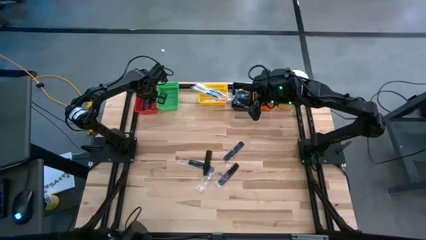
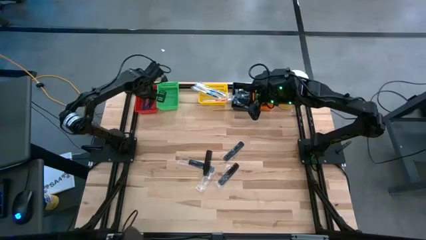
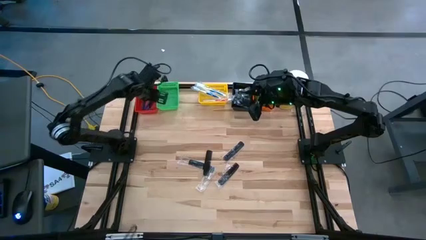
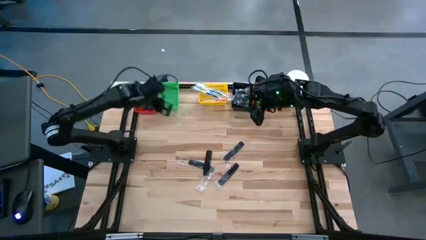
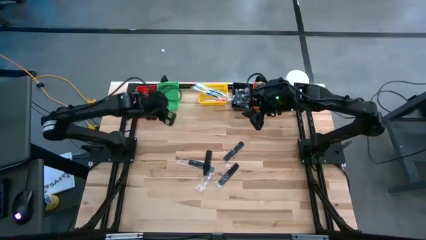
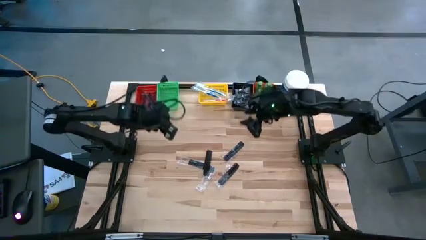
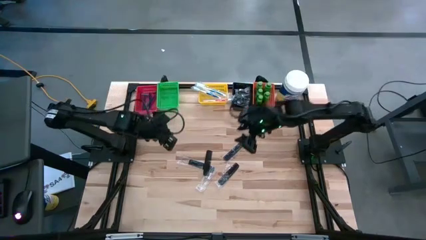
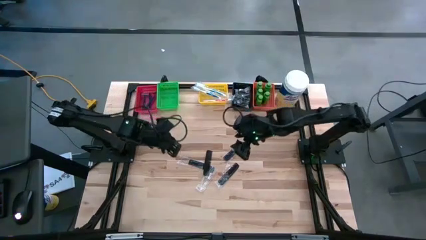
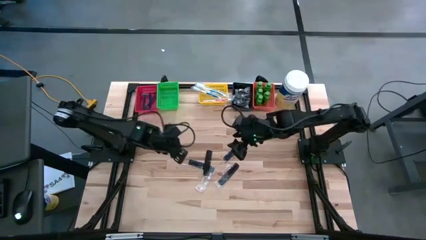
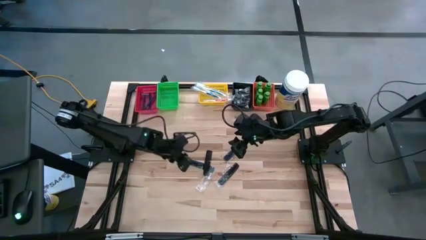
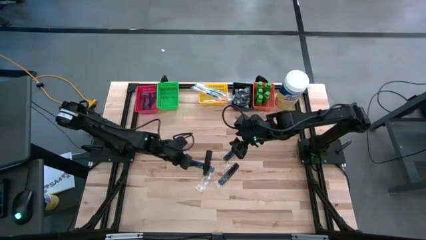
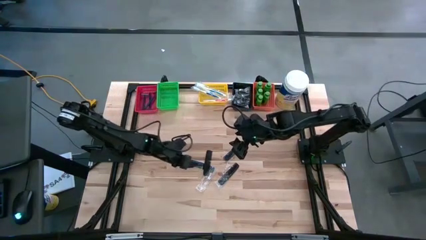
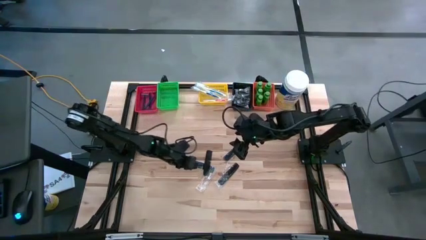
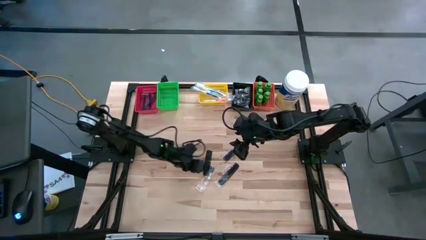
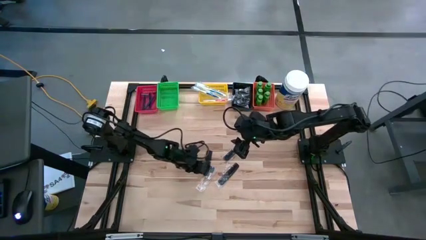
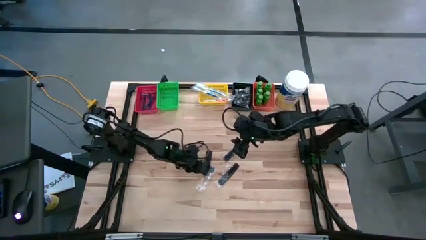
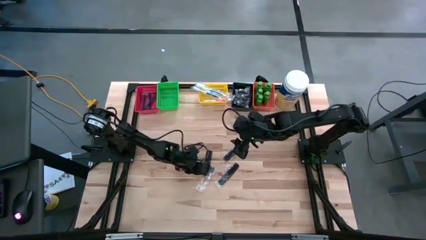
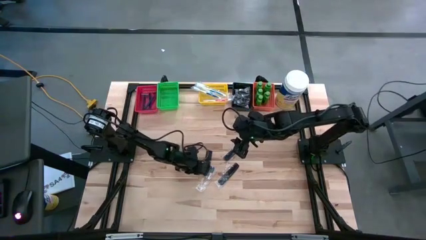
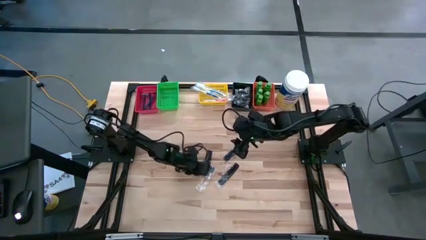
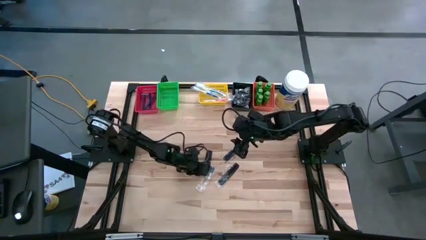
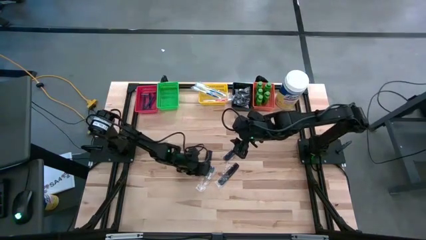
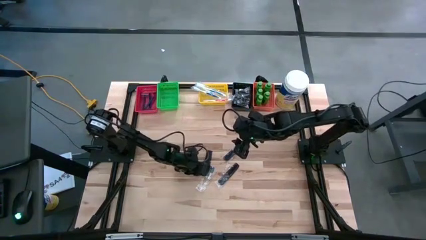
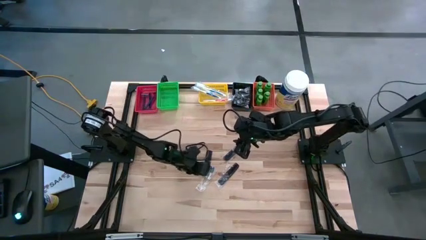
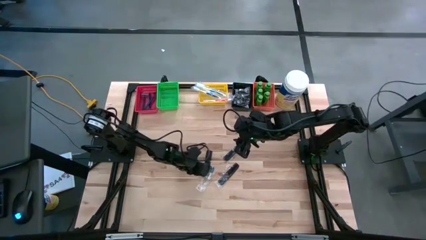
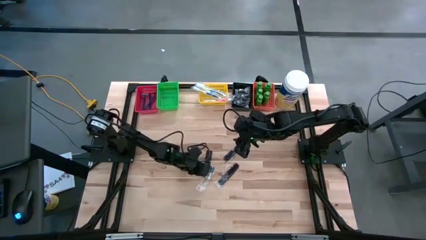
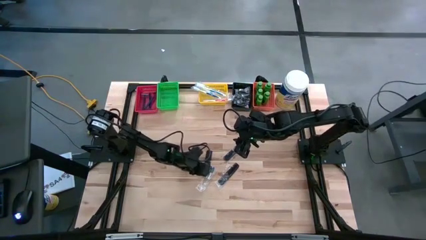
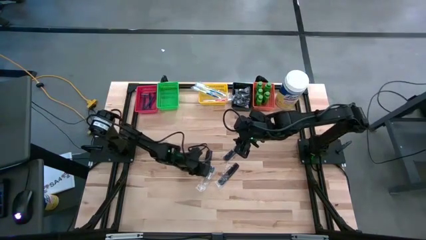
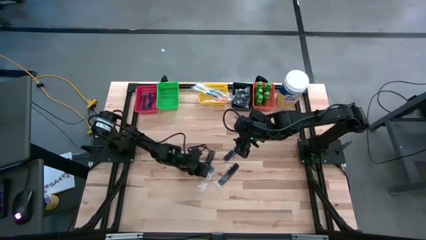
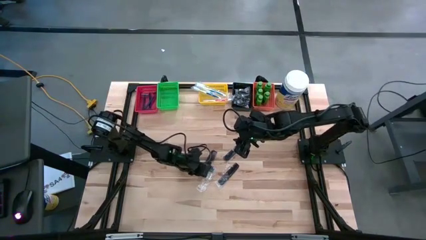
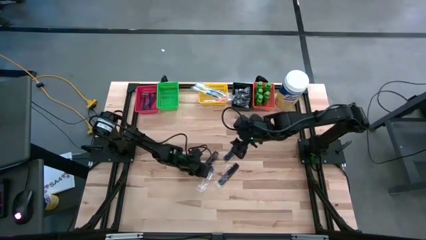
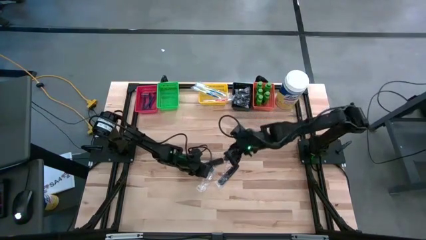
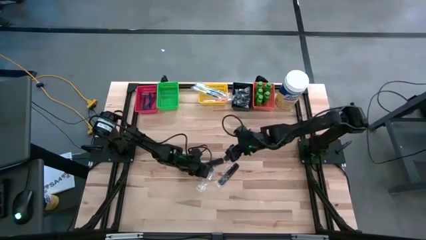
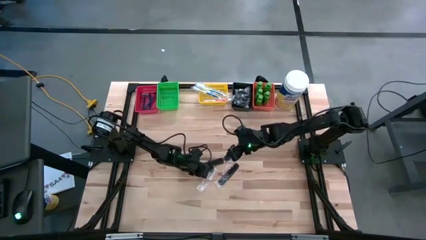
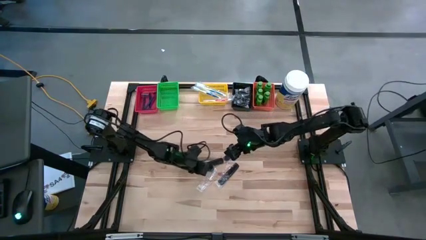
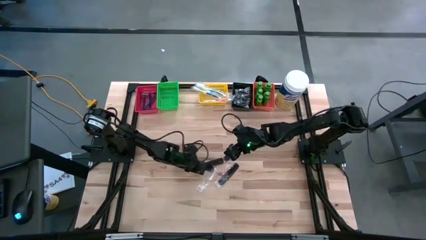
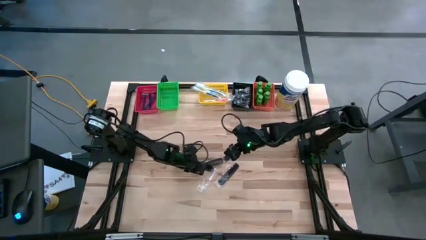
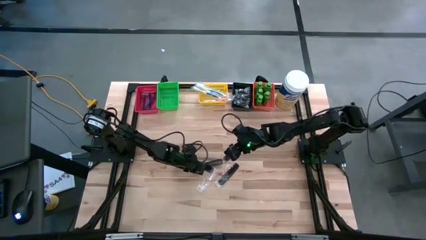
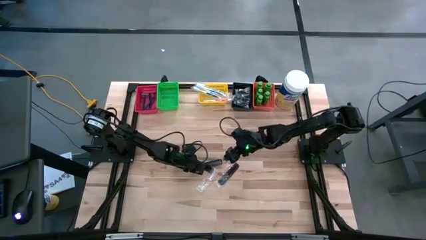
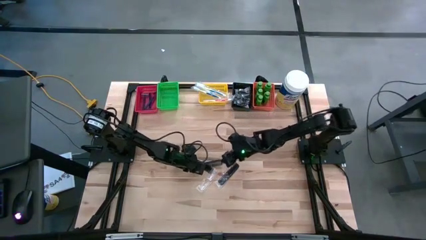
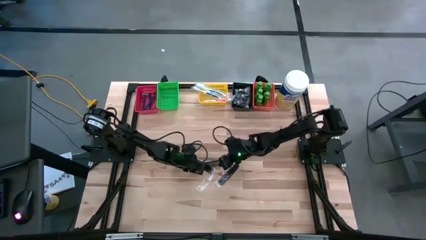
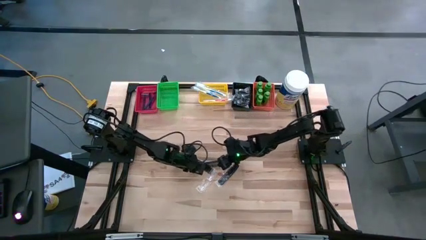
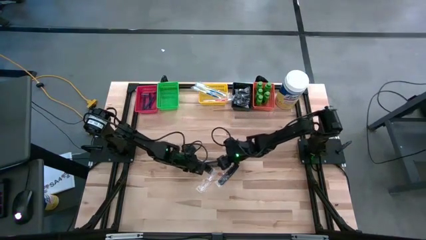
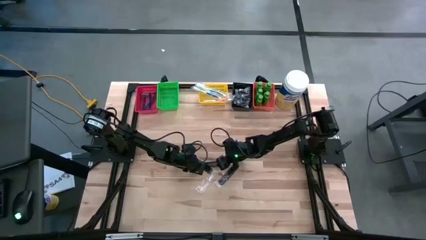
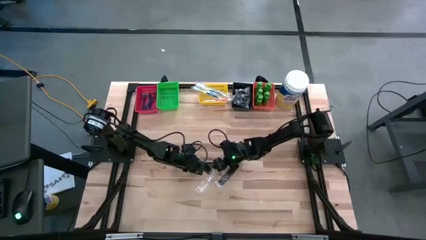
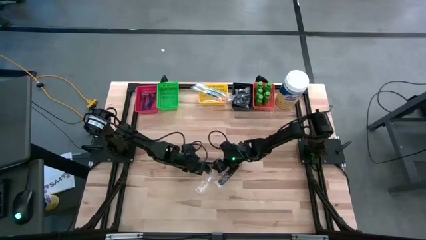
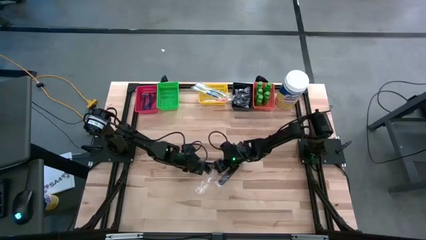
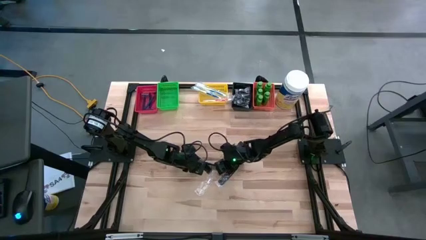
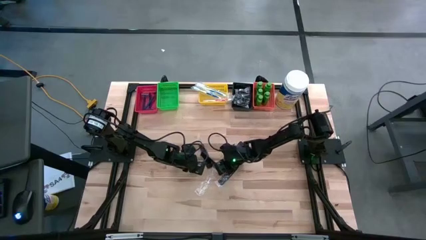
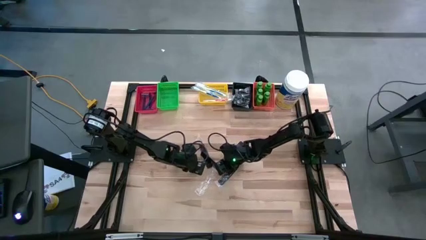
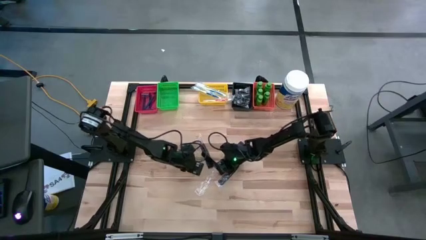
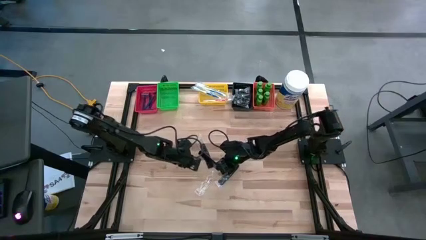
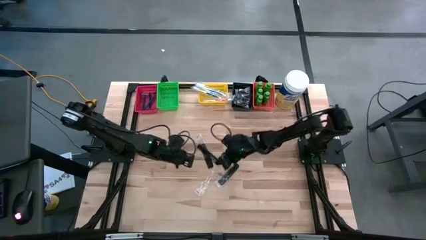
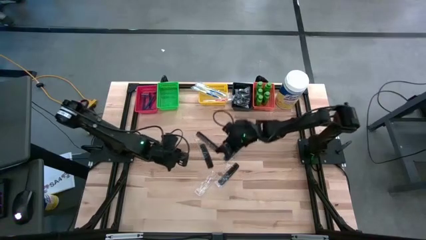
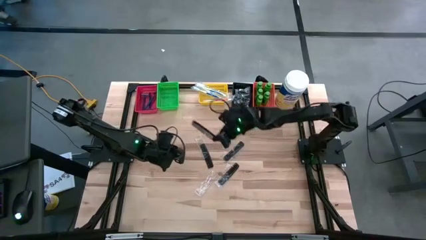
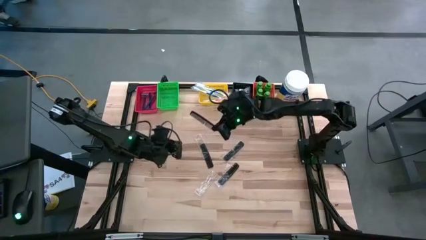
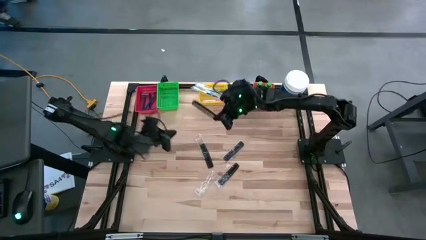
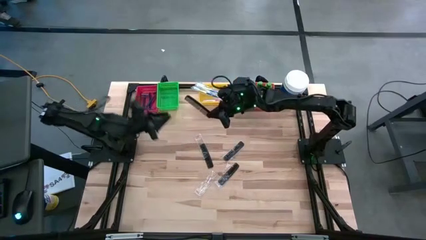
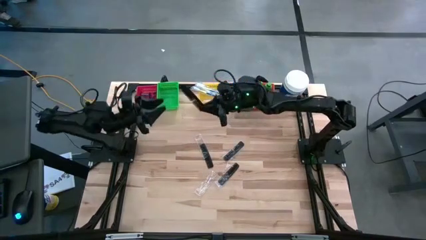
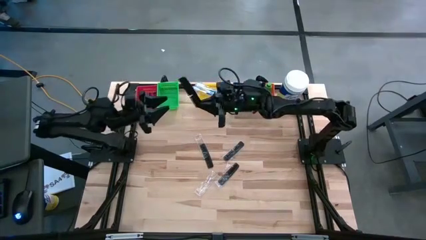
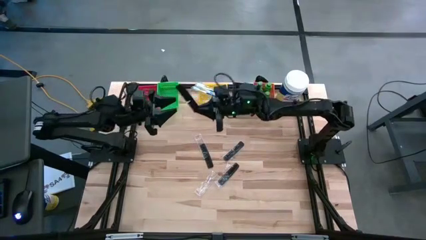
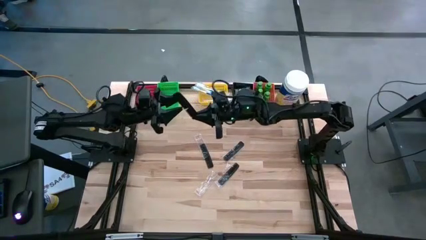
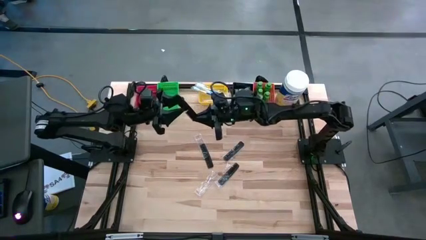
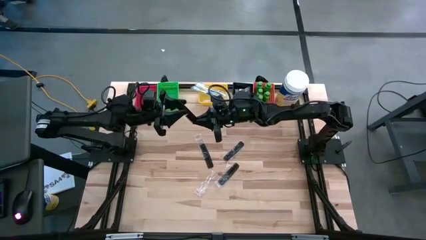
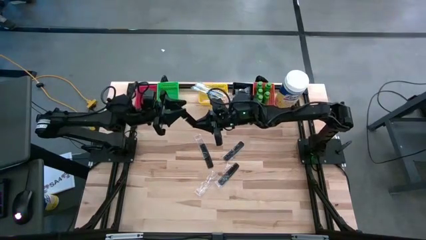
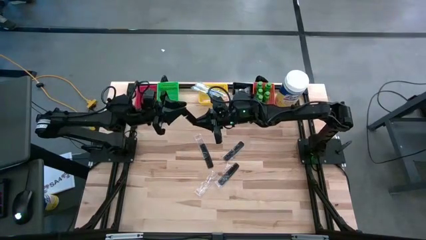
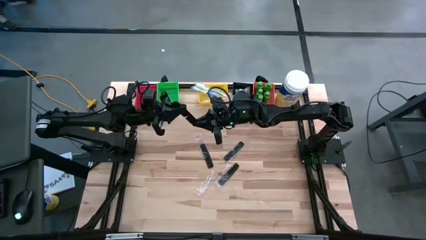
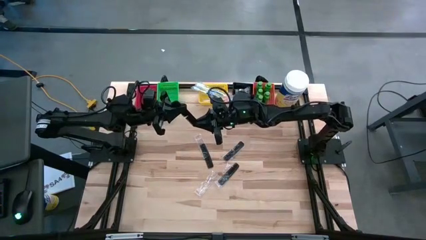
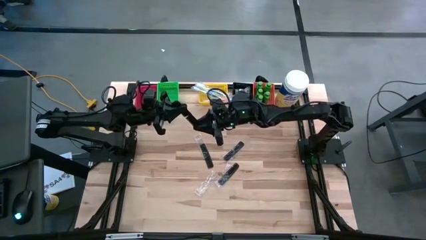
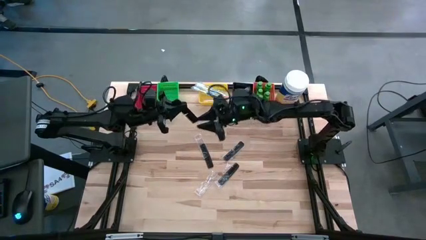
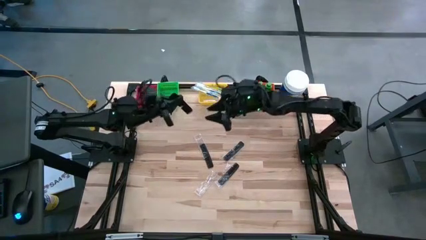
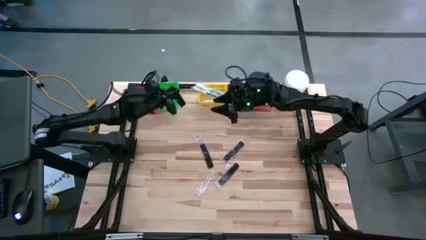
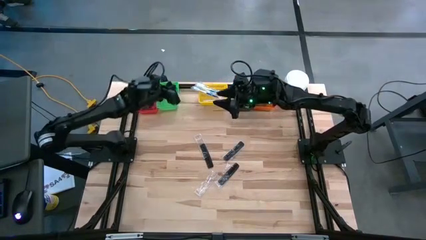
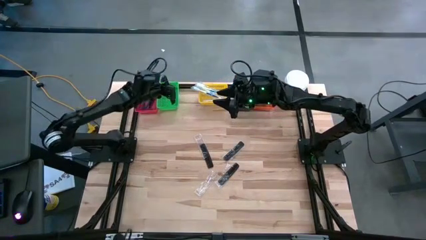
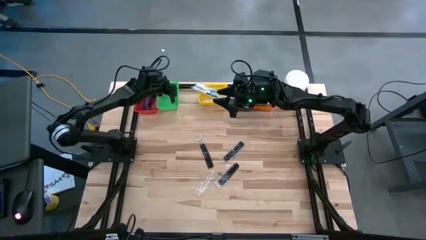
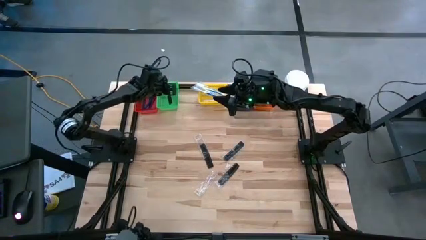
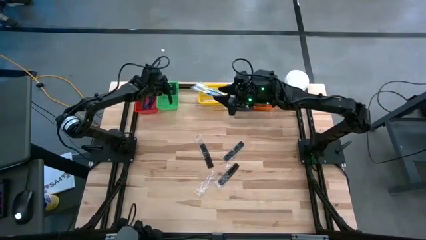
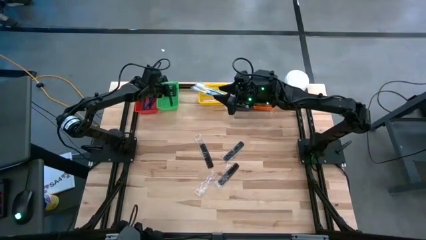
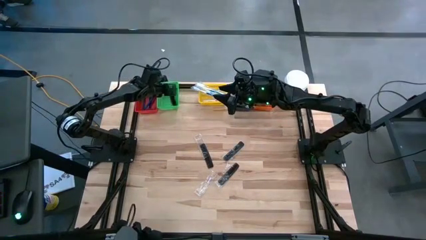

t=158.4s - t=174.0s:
Task: Pick & Place Travel size toiletries
Put the black comb into the green bin

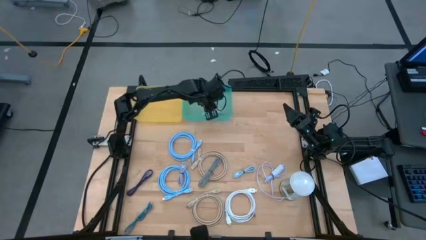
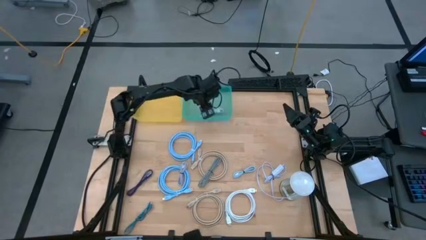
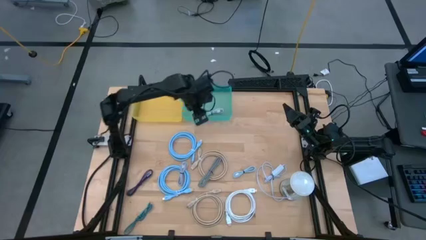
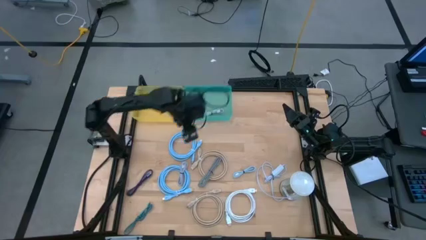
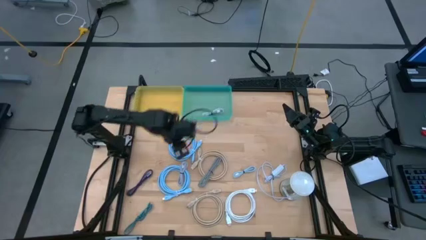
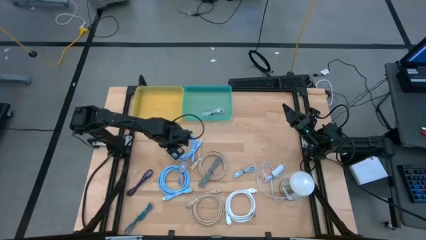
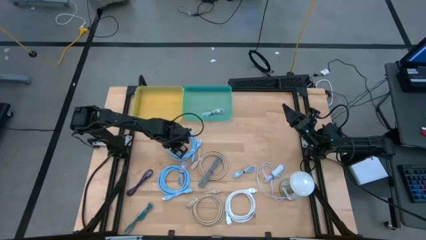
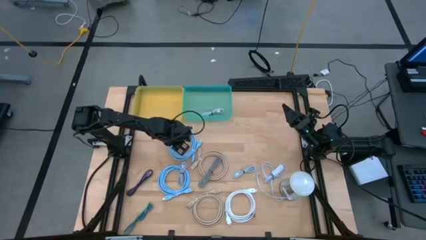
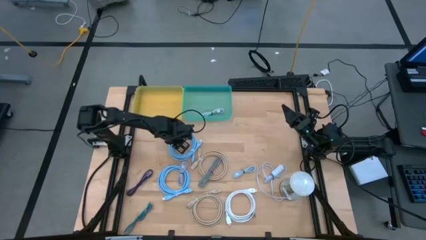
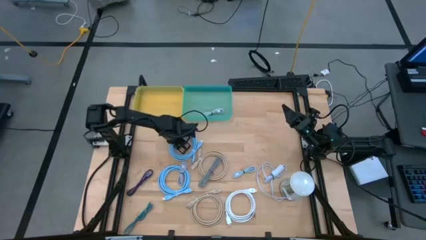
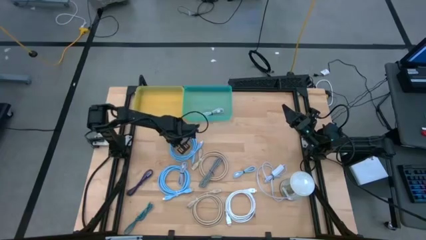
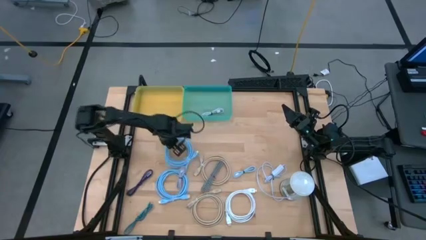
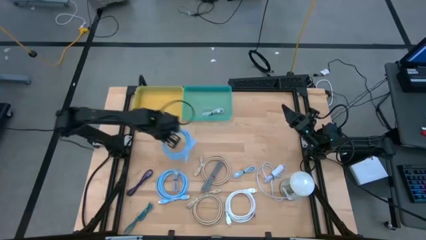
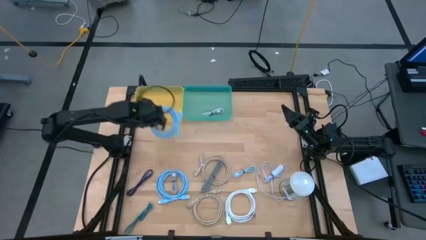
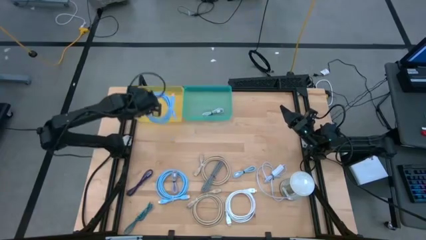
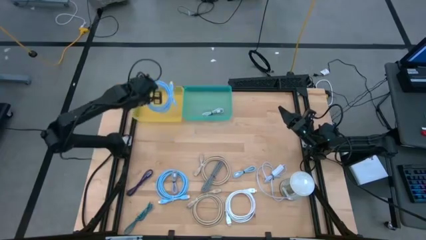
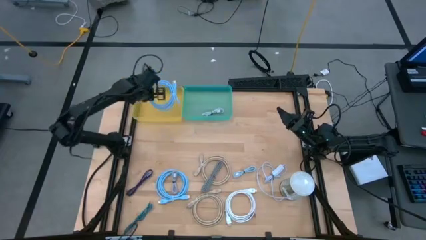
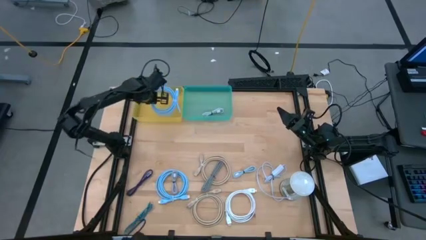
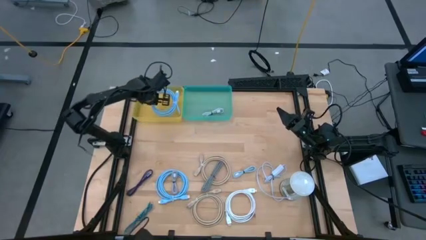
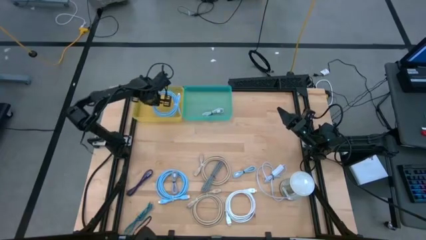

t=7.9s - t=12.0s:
Task: Pick & Place USB Port
Put the top blue HDMI cable into the yellow bin
